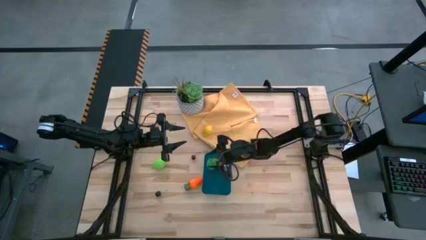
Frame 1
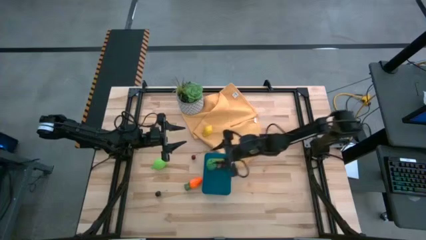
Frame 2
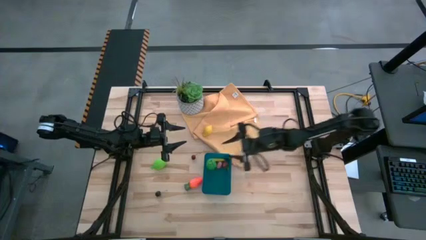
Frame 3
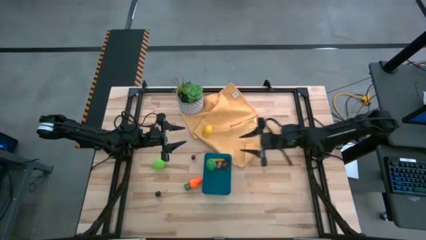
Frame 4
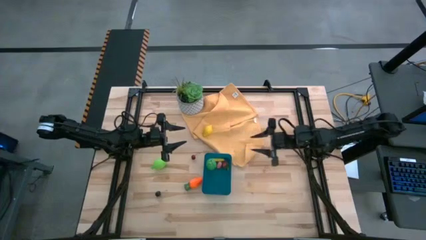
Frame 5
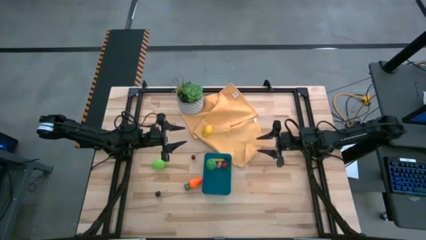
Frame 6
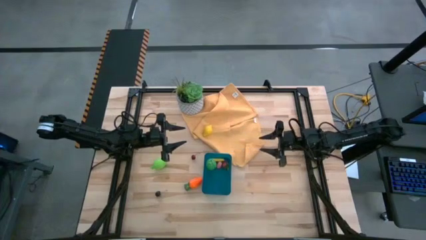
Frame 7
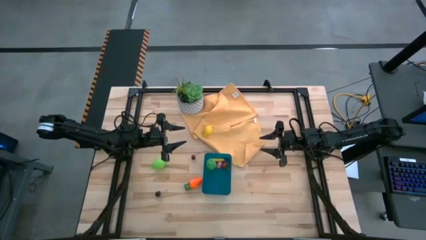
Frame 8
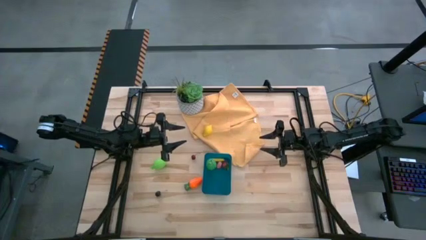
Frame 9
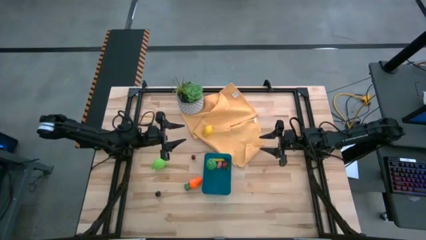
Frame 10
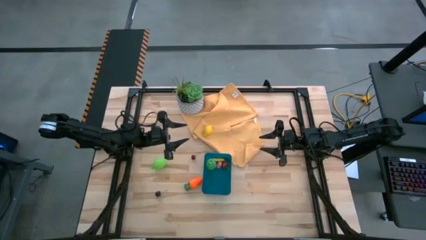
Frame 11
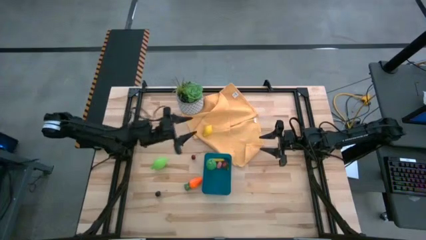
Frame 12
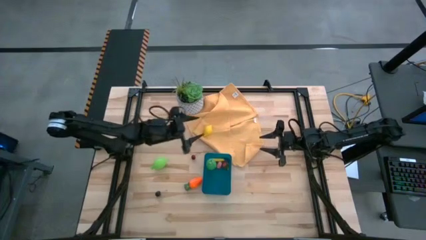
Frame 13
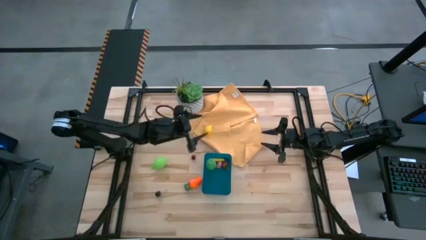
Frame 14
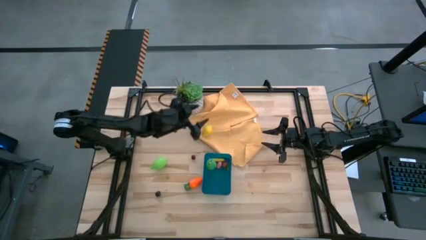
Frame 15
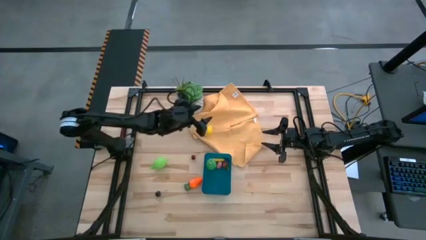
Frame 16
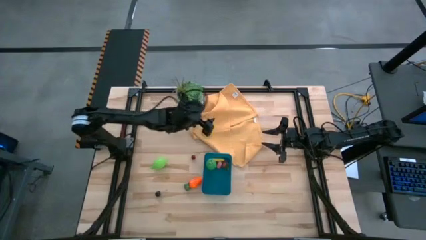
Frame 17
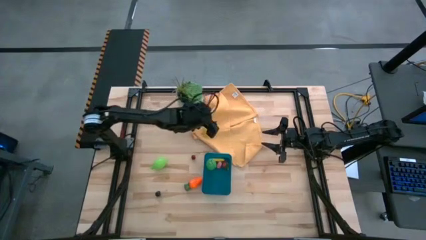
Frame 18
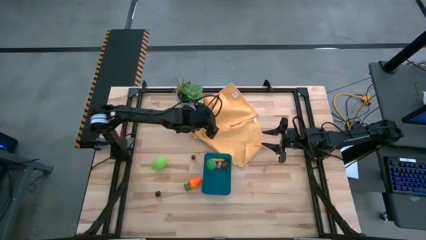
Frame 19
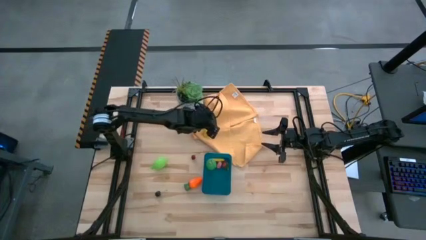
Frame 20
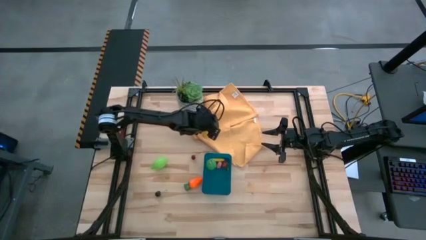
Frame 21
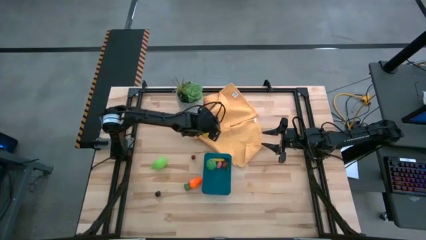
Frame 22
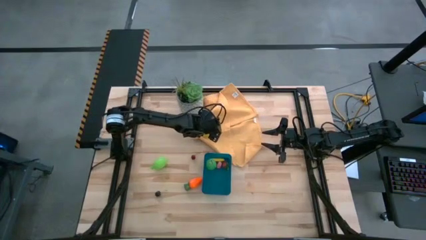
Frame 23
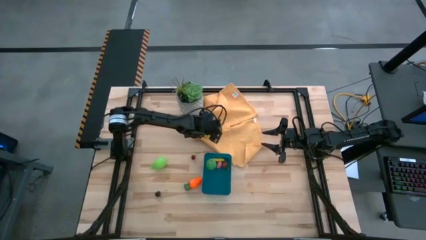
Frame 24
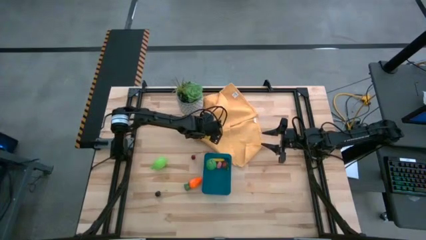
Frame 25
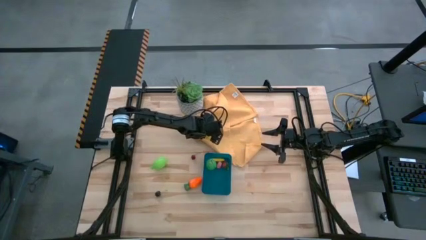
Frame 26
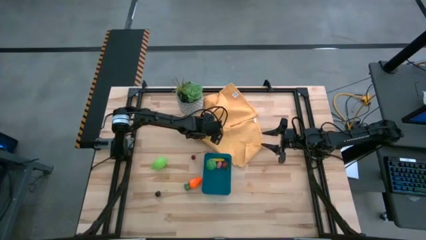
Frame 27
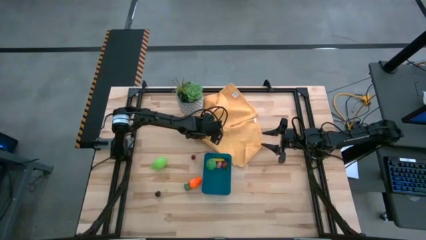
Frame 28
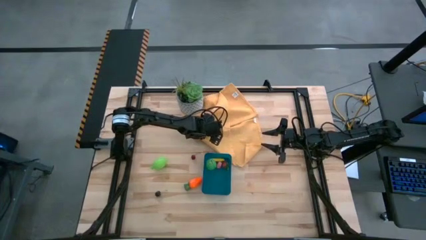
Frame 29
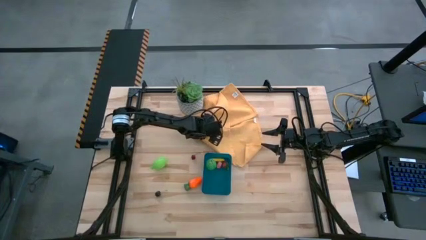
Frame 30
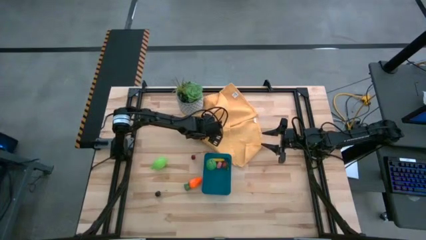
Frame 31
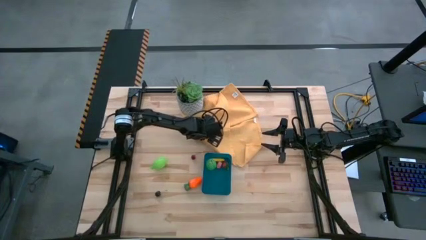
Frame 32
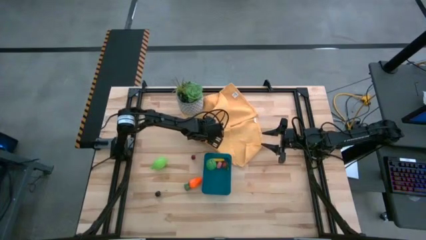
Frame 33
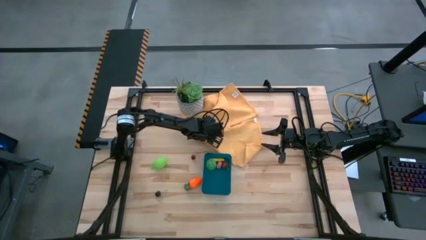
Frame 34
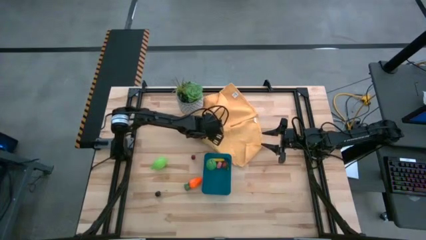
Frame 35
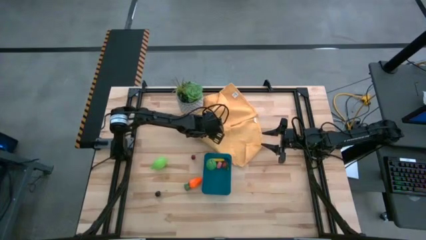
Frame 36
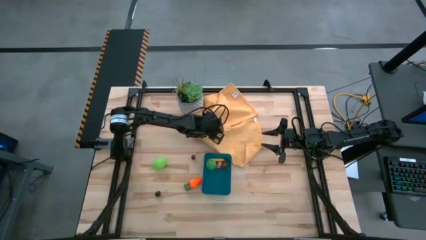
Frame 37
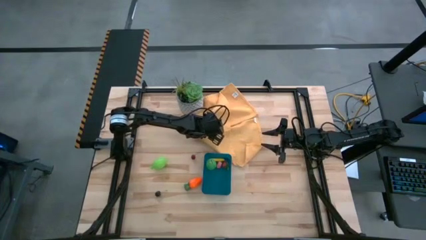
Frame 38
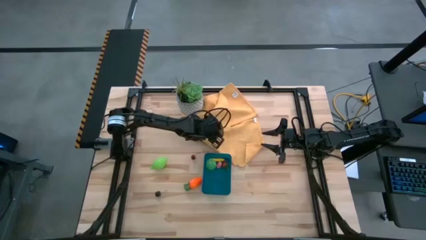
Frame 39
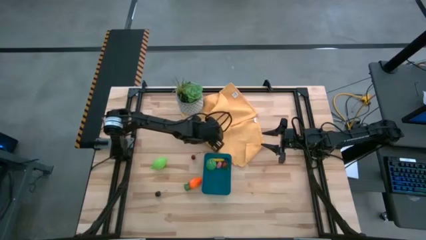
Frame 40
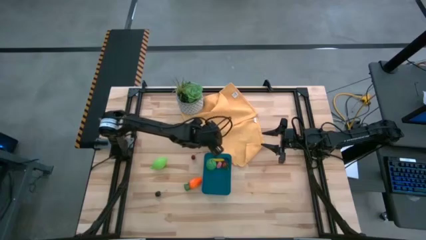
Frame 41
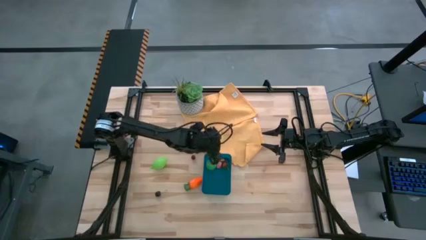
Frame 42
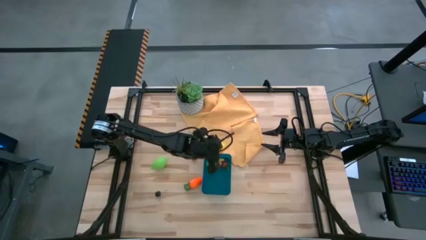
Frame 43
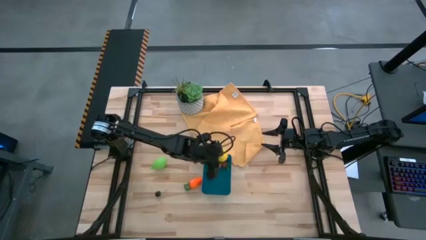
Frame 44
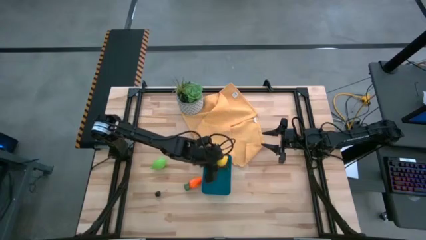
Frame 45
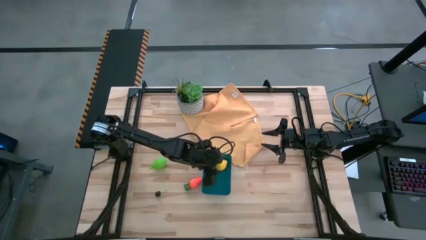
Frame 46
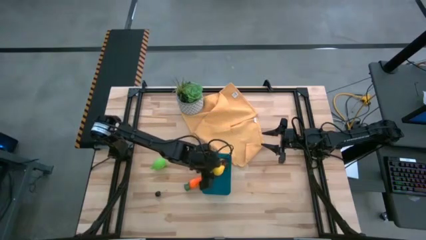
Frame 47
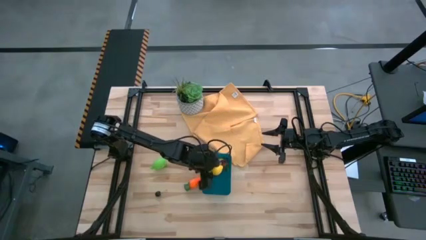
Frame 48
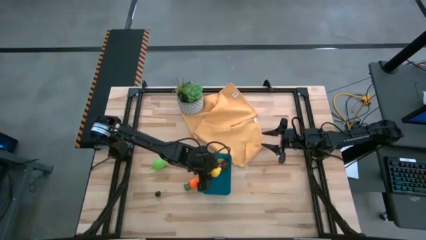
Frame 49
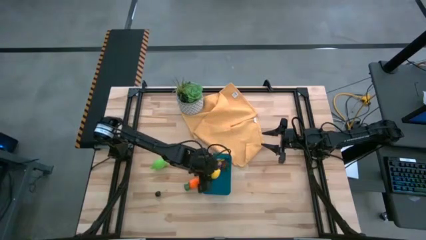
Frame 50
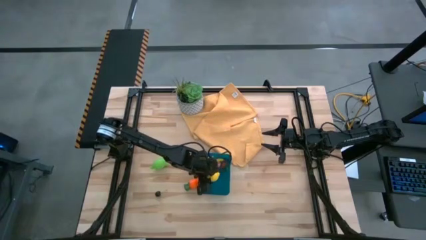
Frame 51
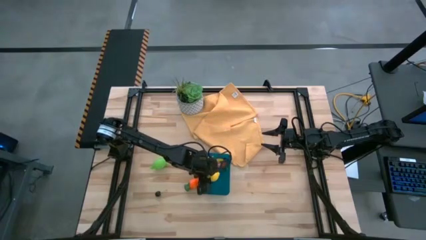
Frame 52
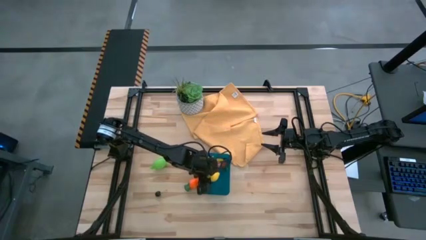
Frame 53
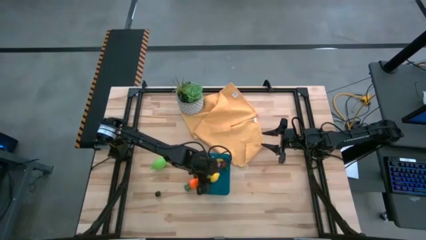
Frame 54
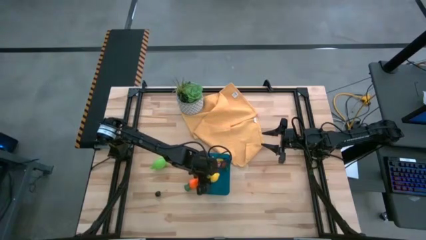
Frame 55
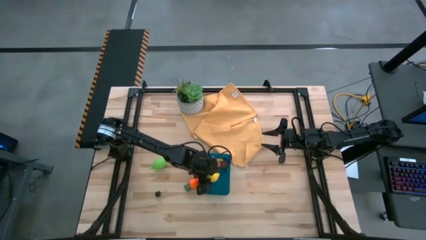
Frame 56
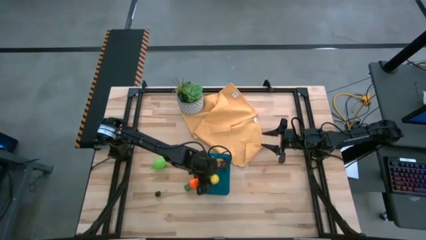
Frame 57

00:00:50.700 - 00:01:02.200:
Task: Pick and placing Produce into tupperware
Put the lemon into the bin

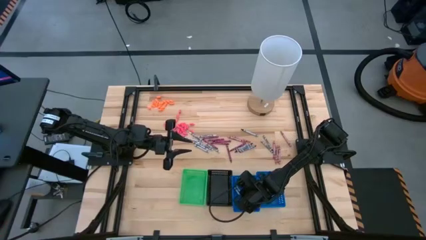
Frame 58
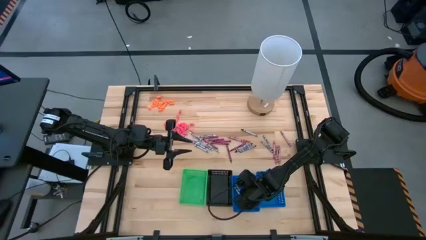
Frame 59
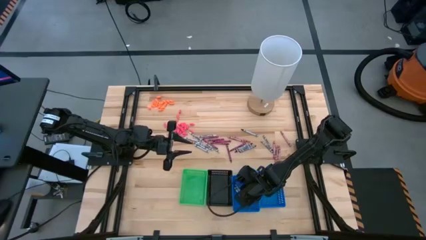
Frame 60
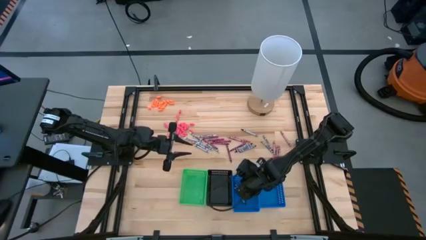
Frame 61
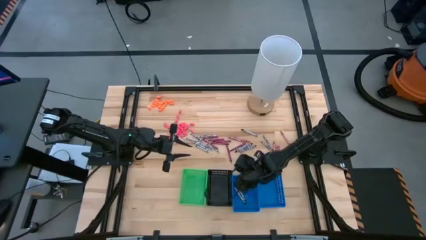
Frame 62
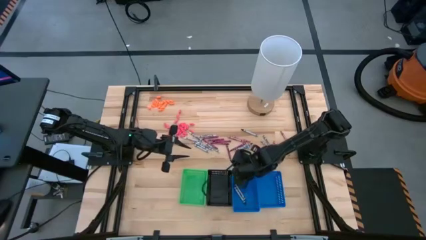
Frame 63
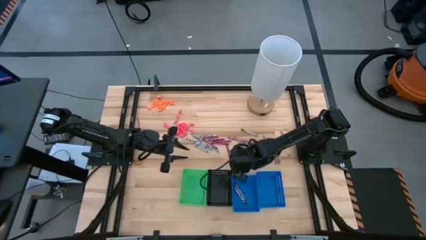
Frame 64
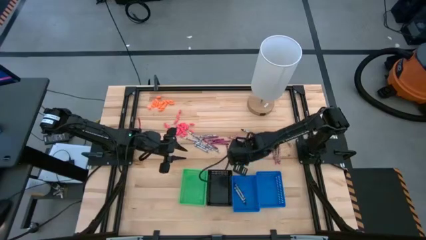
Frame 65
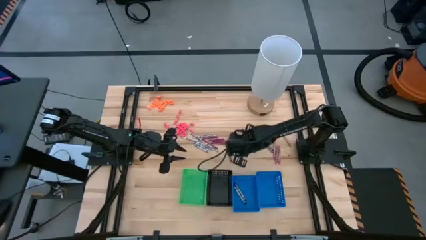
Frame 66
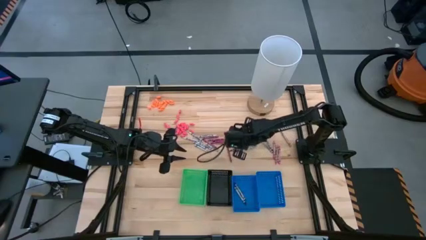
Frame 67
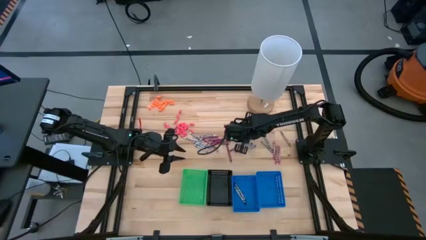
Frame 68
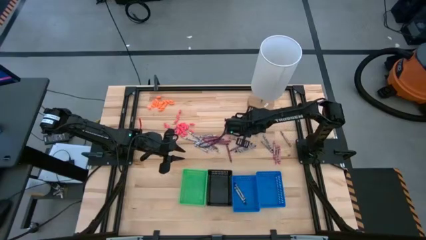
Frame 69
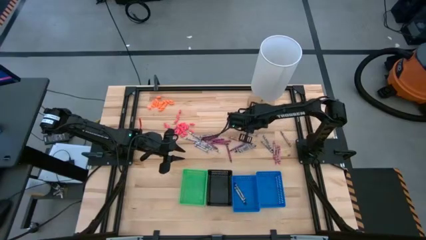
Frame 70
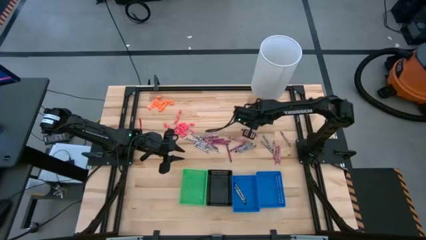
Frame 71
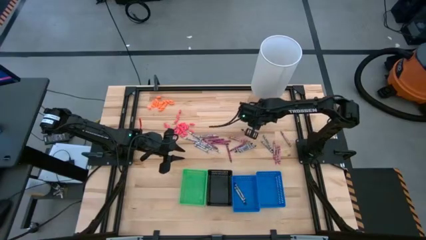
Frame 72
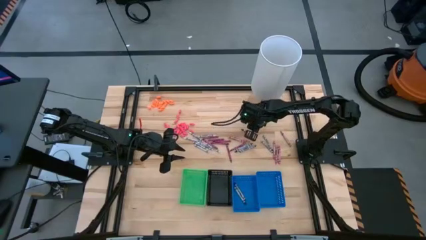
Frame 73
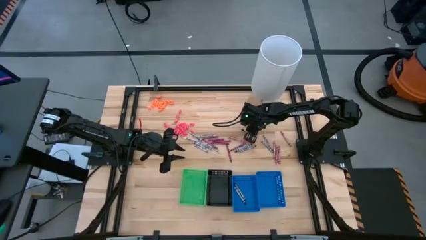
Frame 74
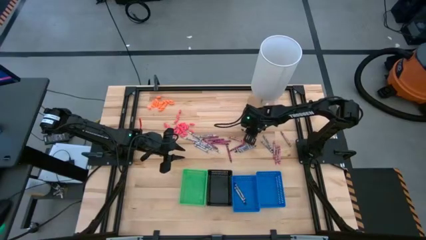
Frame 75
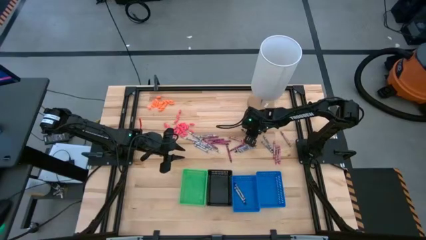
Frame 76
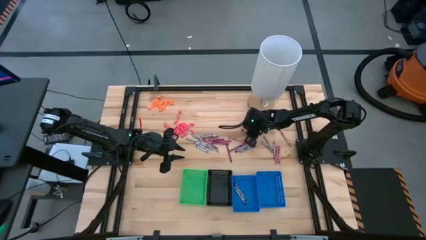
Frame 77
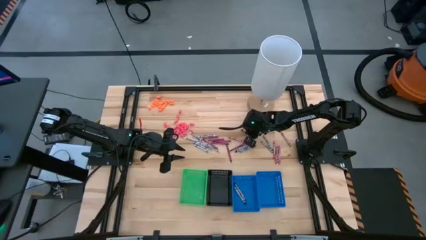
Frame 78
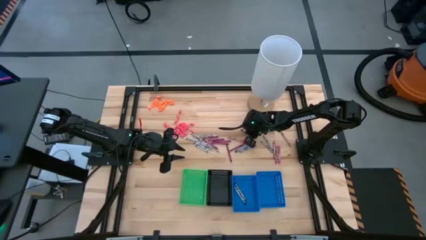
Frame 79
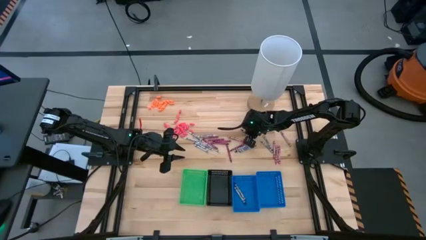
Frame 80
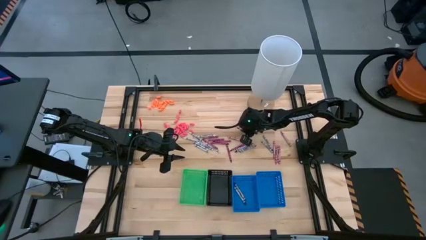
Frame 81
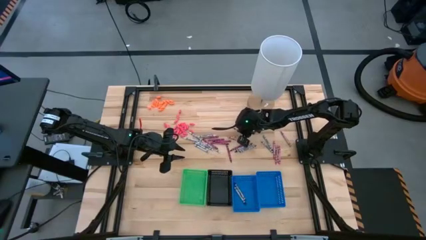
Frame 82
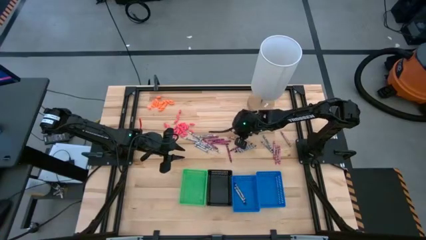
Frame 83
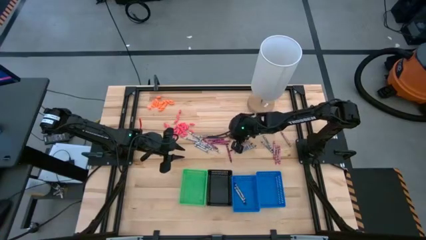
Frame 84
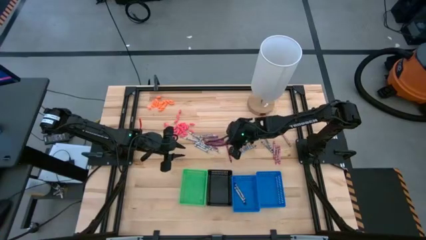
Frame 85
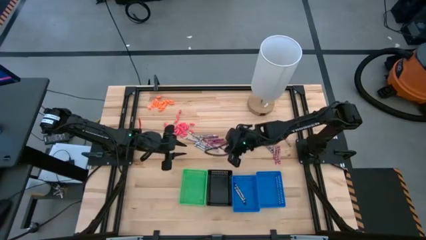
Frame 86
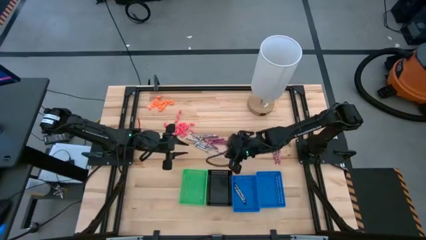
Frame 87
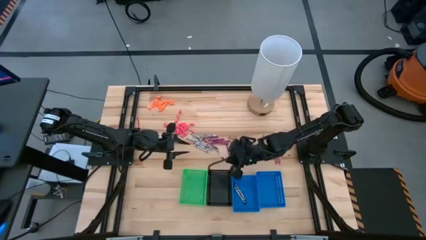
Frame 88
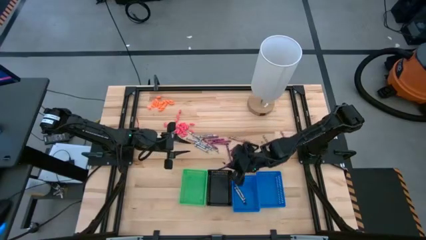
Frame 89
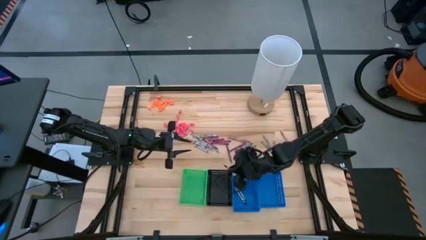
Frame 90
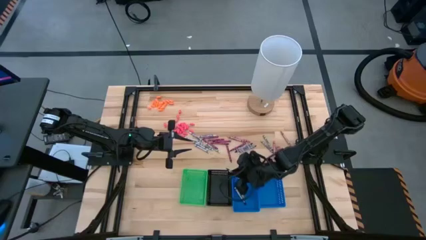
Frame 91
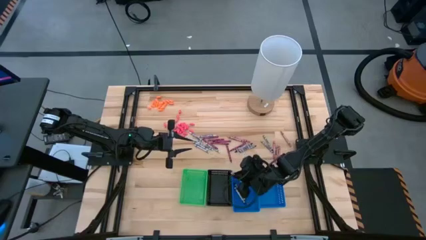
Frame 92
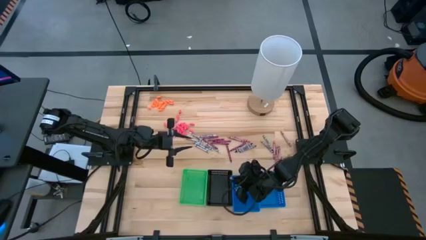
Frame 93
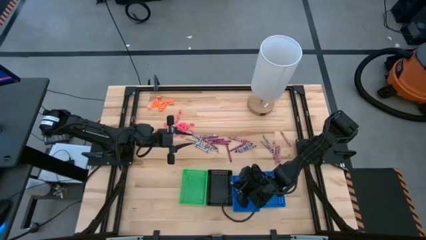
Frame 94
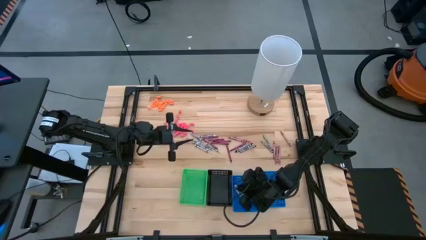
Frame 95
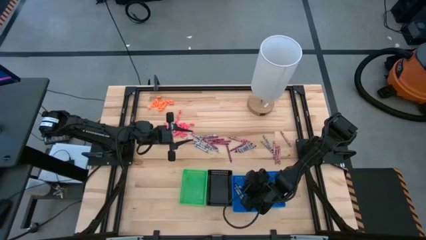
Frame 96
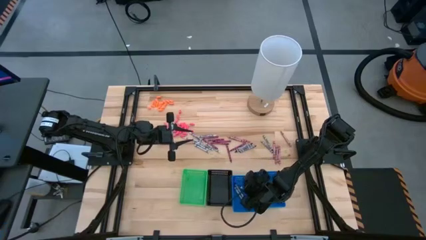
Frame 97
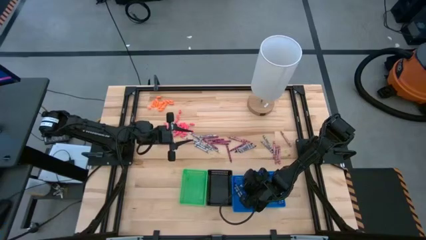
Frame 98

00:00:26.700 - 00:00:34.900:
Task: Sort crayons
Put the black crayon into the left blue bin
